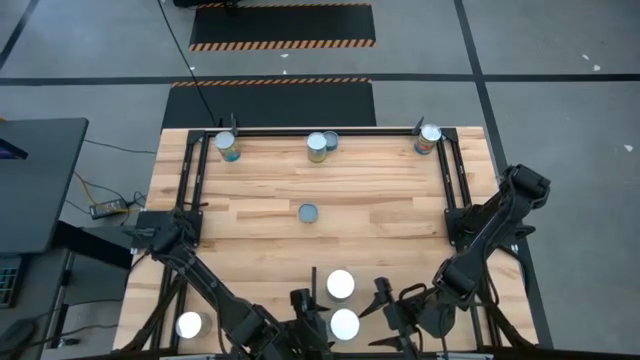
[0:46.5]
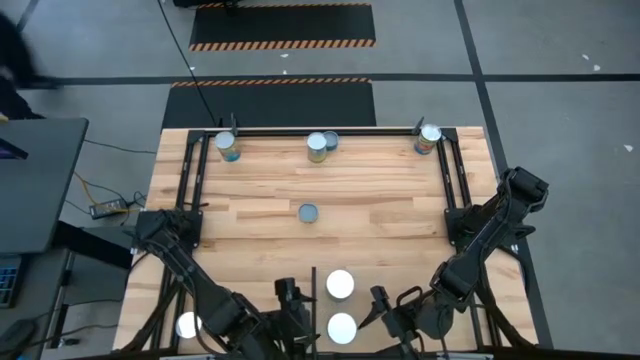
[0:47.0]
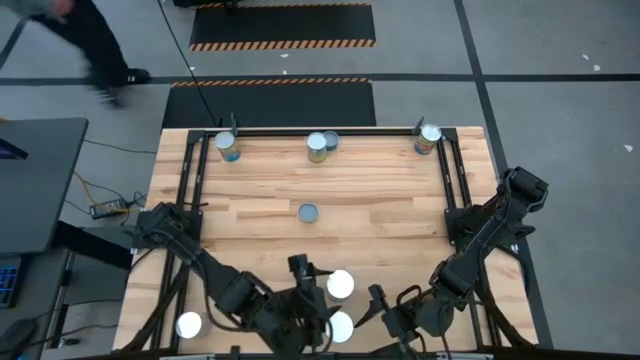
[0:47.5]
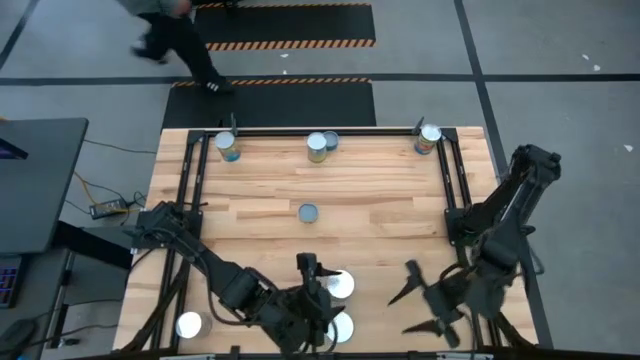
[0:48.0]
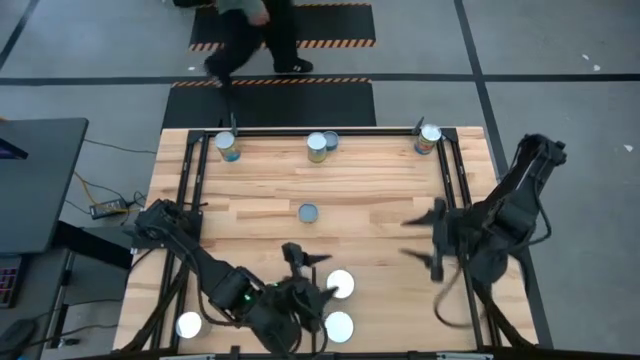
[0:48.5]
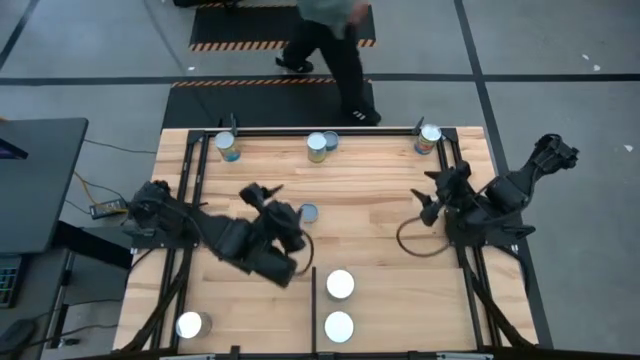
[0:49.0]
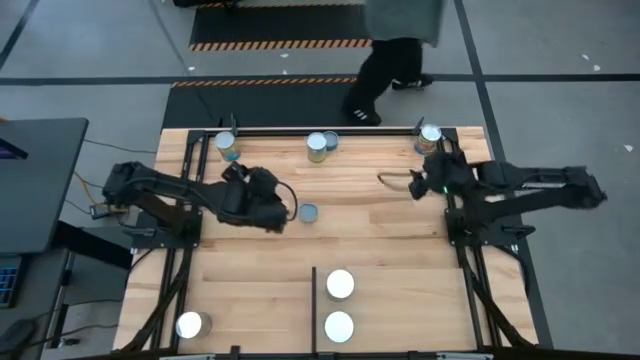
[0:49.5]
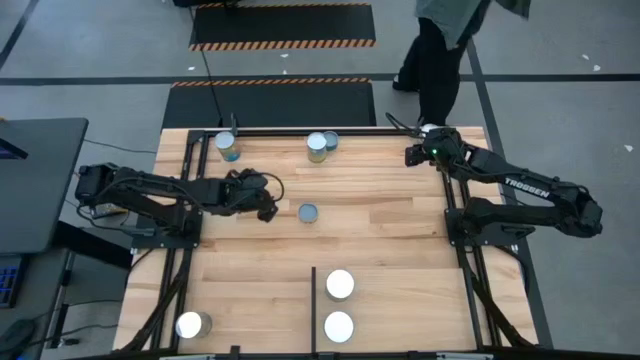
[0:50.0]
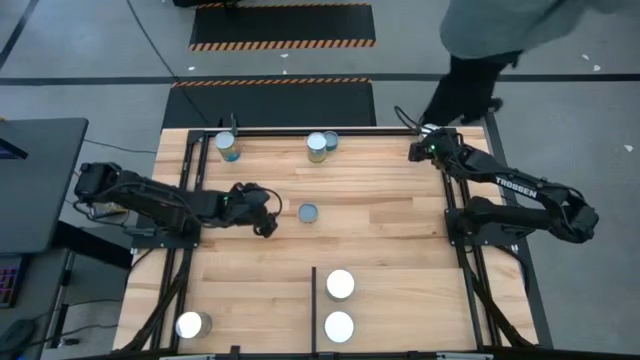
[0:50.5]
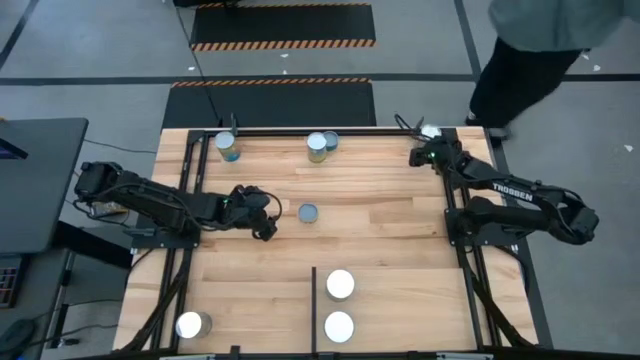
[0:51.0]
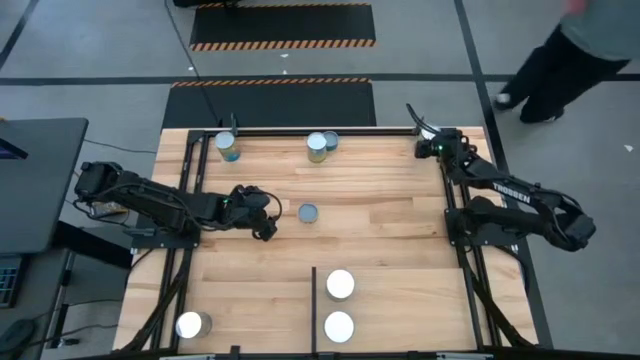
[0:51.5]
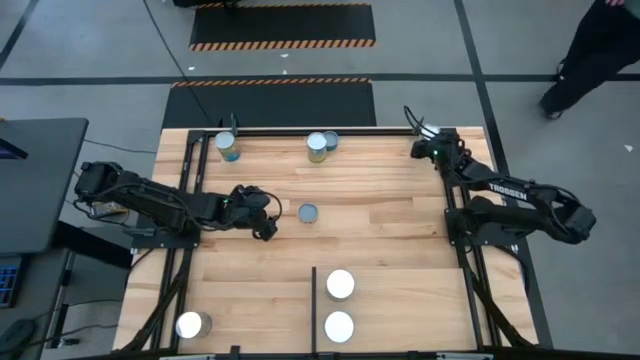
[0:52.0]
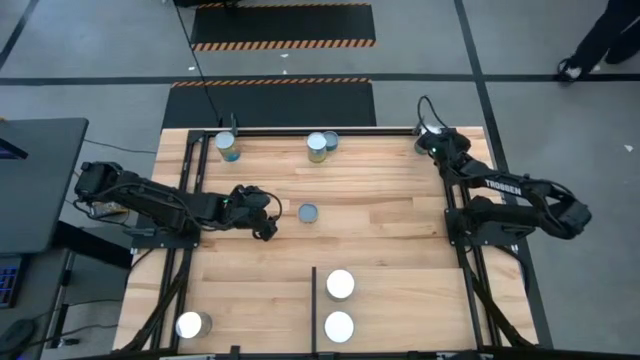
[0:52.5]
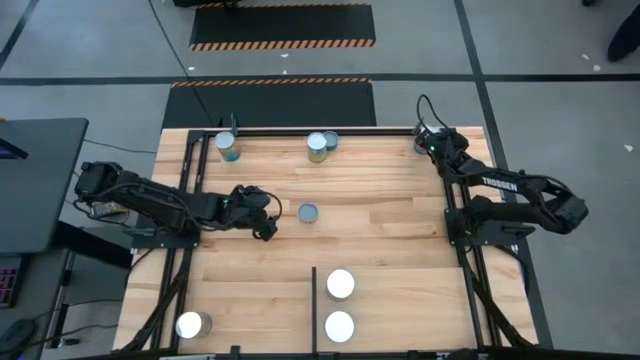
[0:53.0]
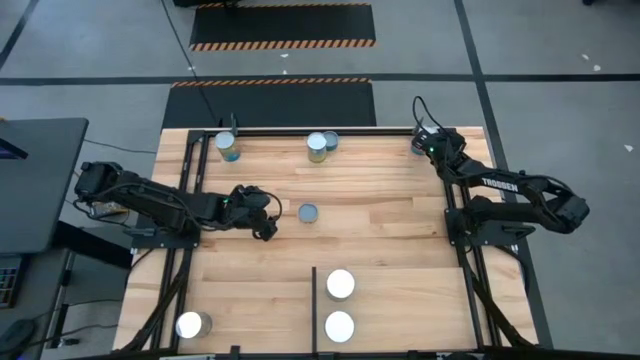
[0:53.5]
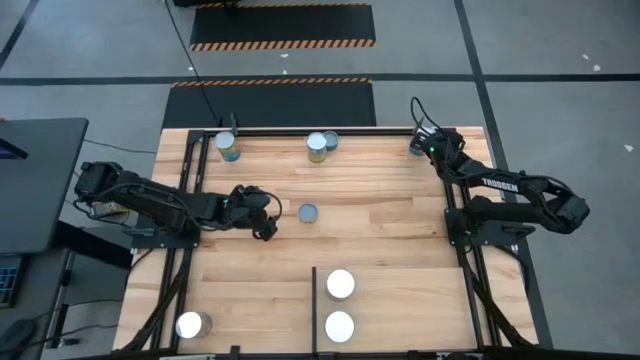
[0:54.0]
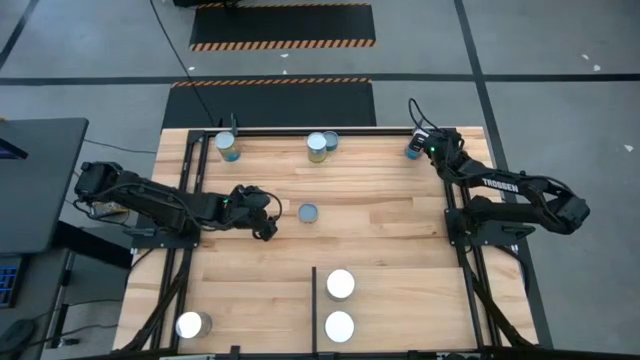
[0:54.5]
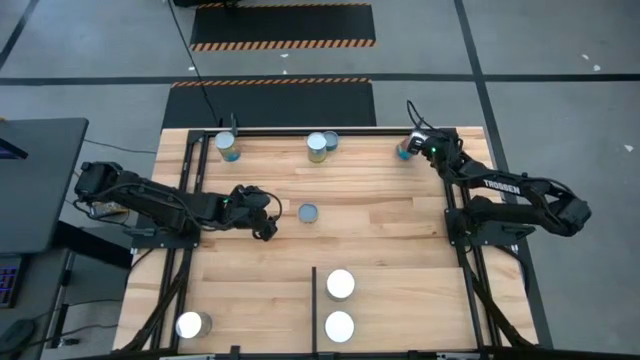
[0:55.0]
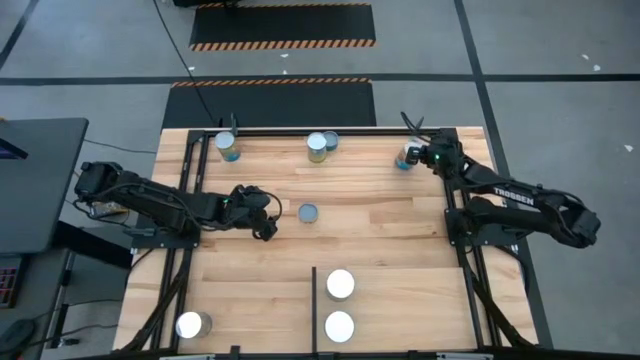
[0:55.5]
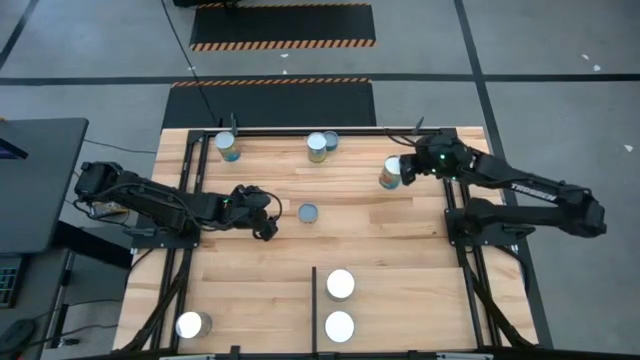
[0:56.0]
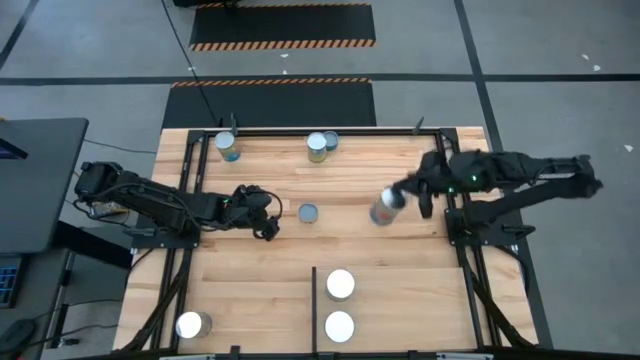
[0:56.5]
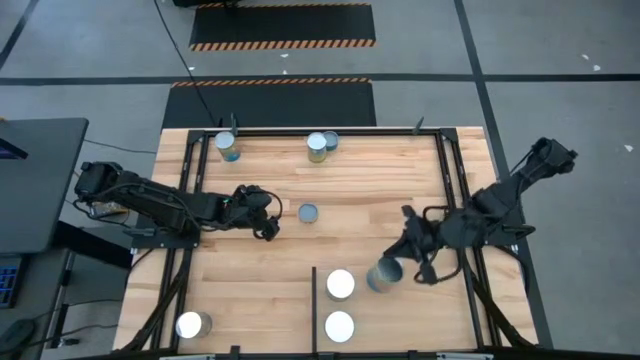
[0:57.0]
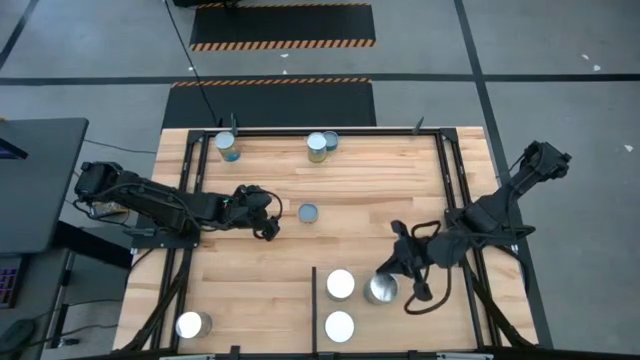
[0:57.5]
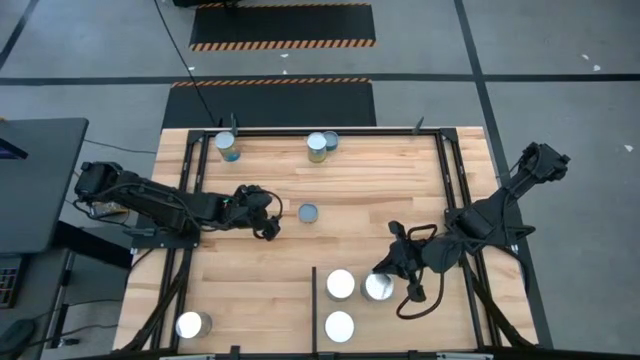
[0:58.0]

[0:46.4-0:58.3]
Task: Pick and place cans onto a shelf
Put the right canned tomatoes on the shelf

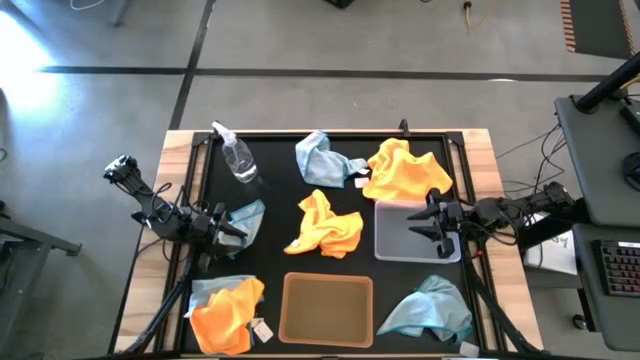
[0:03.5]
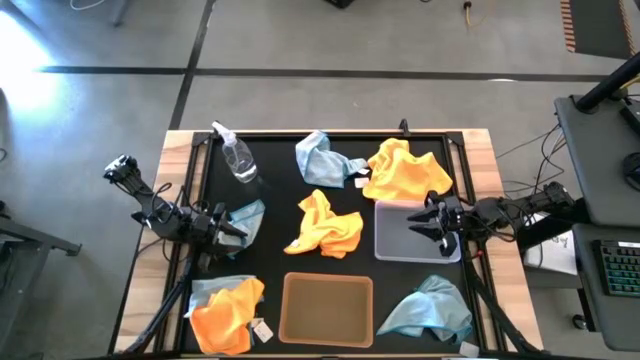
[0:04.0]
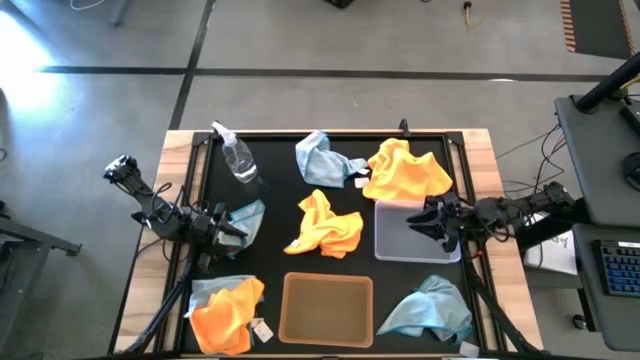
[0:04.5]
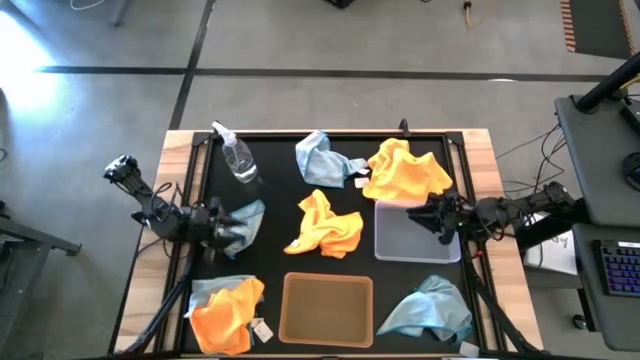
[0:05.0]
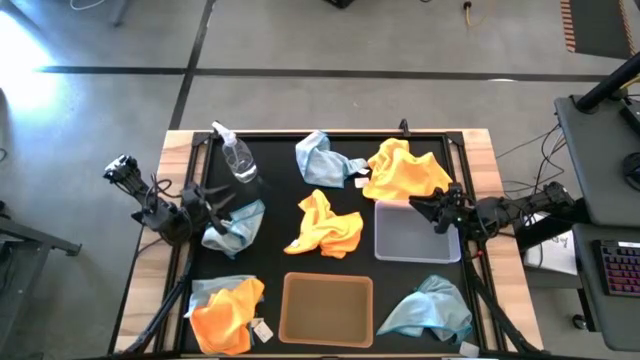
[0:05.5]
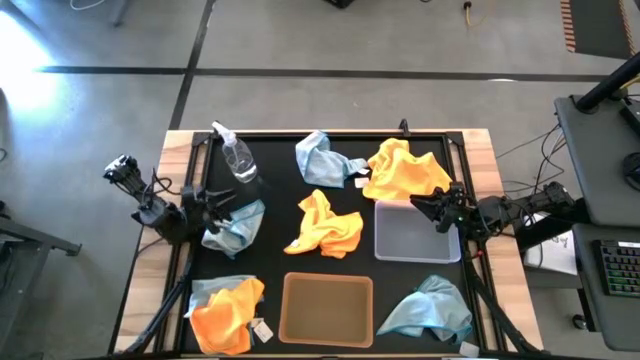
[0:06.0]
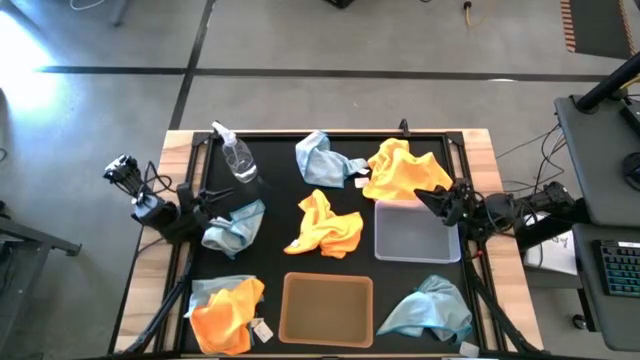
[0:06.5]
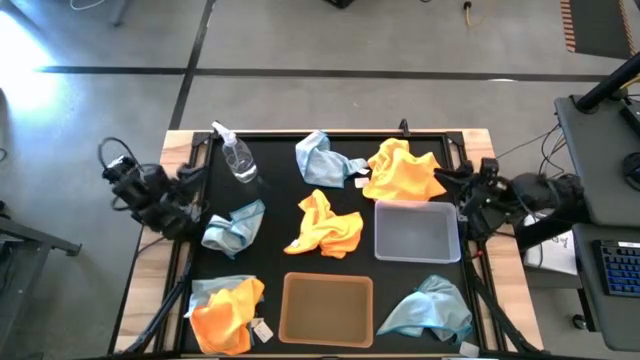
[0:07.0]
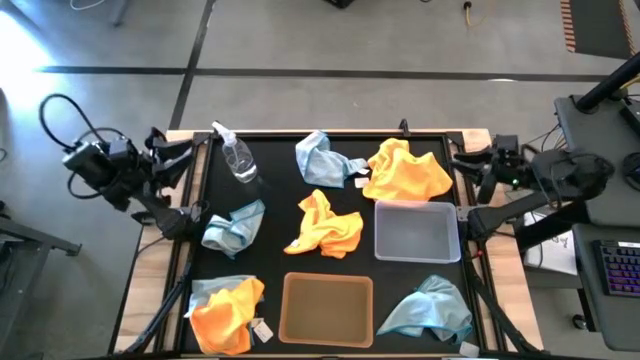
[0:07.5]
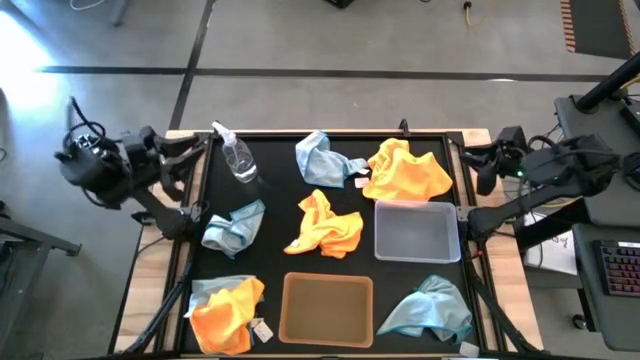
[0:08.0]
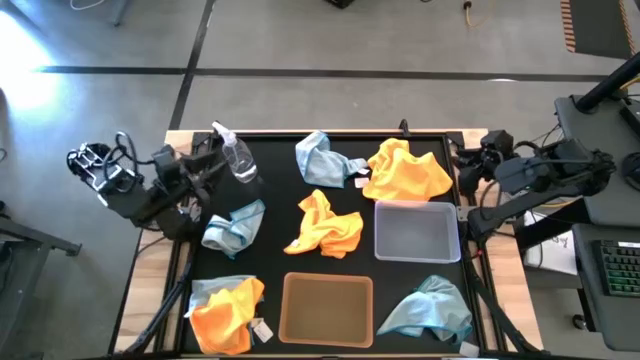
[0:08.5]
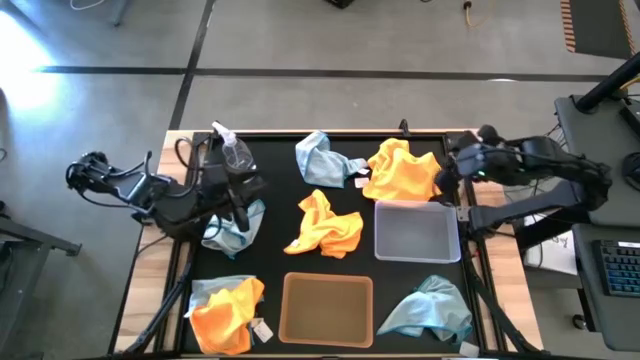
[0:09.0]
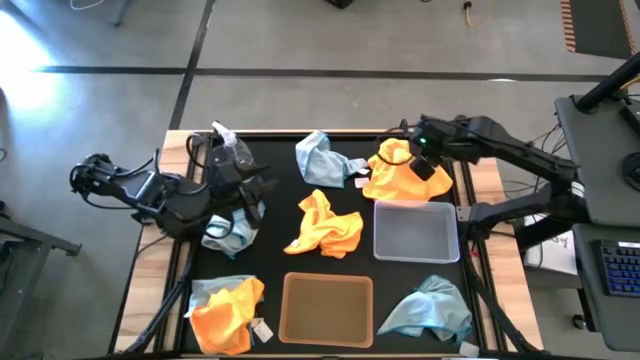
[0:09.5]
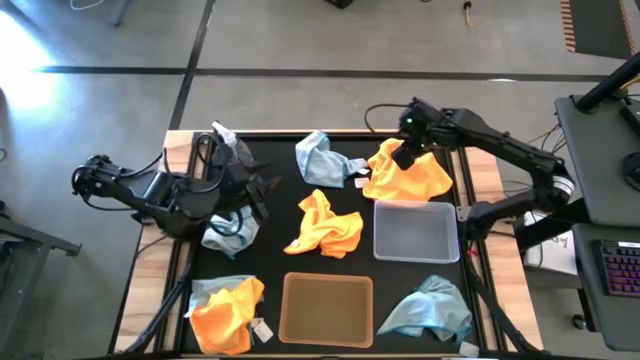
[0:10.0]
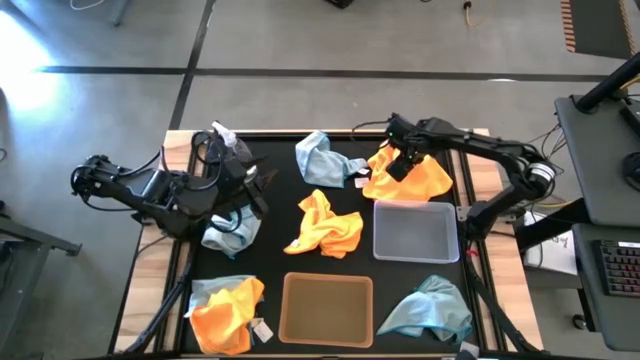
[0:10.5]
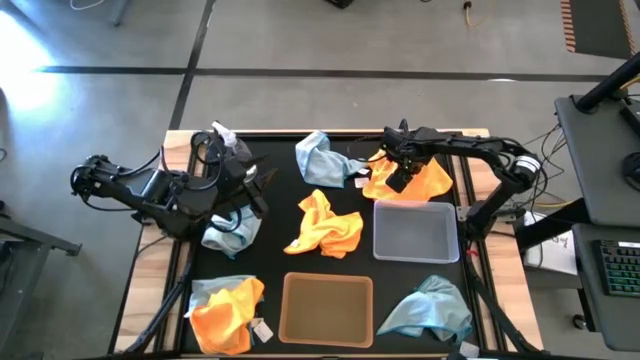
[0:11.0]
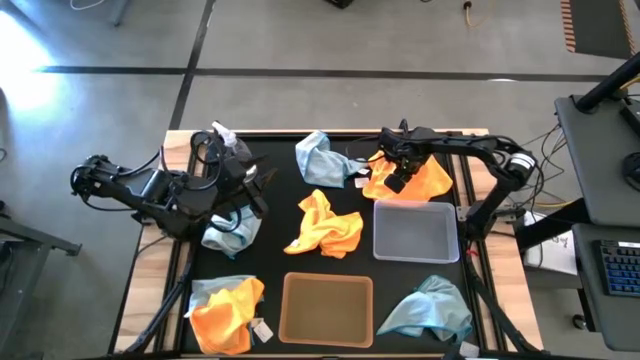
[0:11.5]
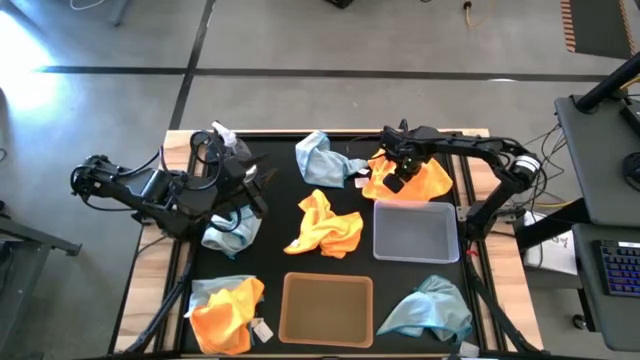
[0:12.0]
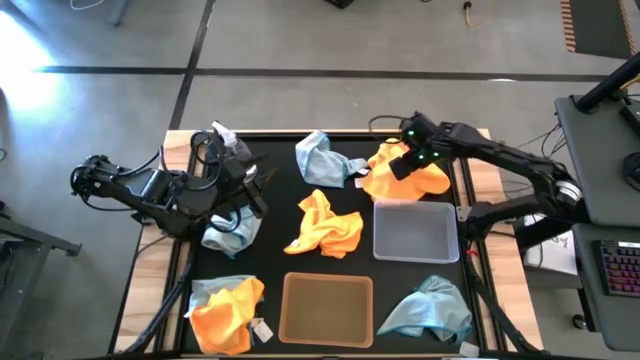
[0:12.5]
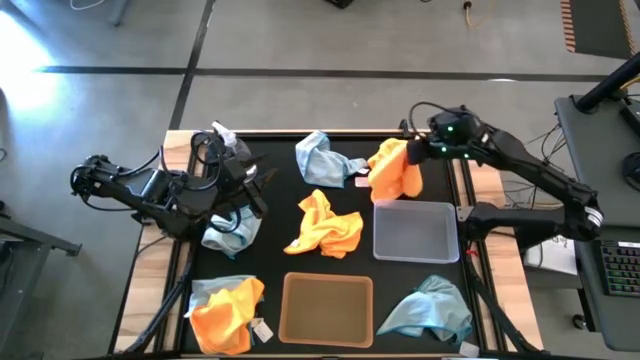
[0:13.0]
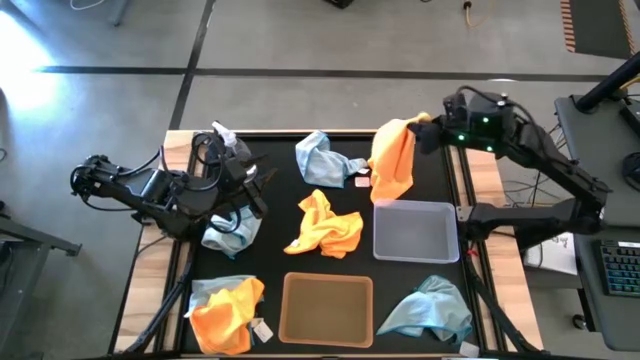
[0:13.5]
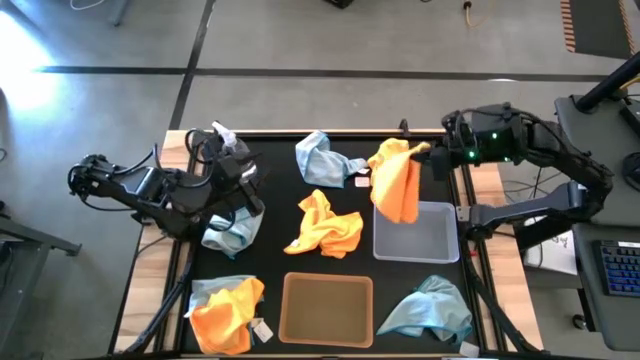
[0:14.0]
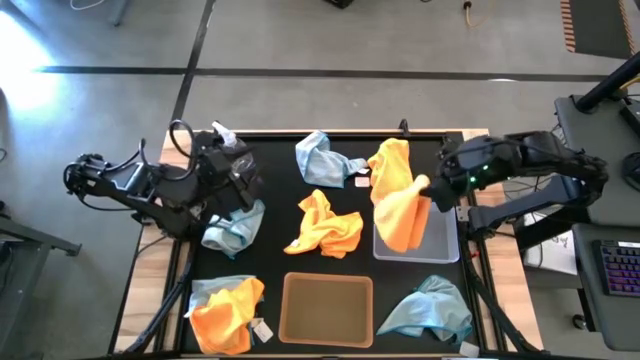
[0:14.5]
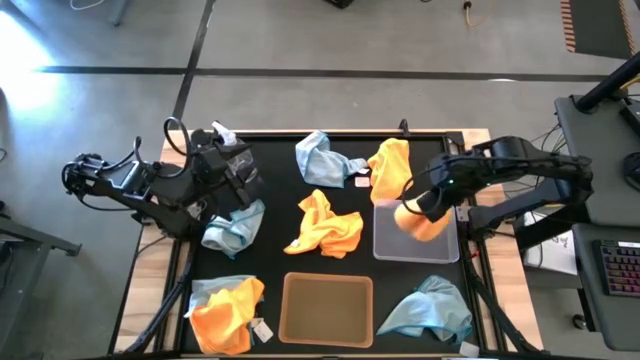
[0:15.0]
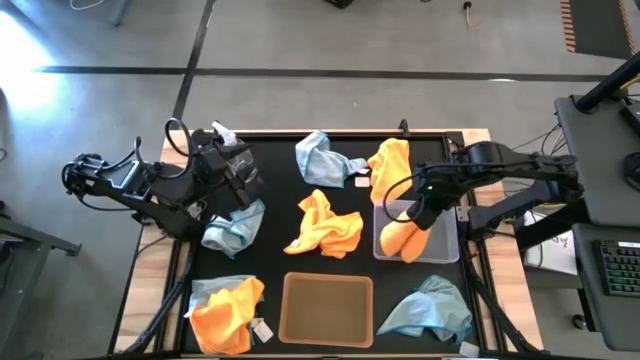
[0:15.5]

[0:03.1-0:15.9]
Task: Sort microfiber towel by color & place in baskets
Put the orange microfiber towel into the transparent bin
